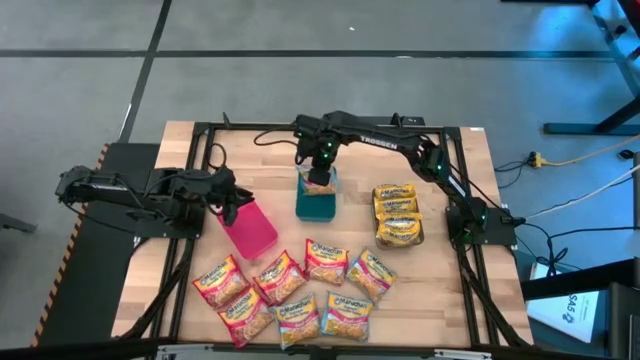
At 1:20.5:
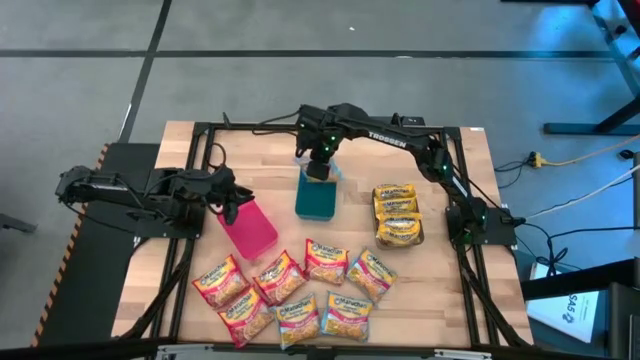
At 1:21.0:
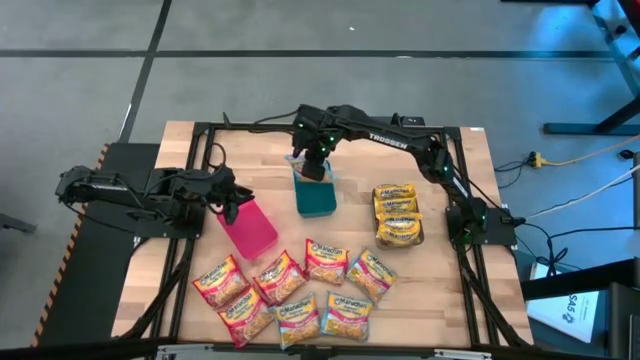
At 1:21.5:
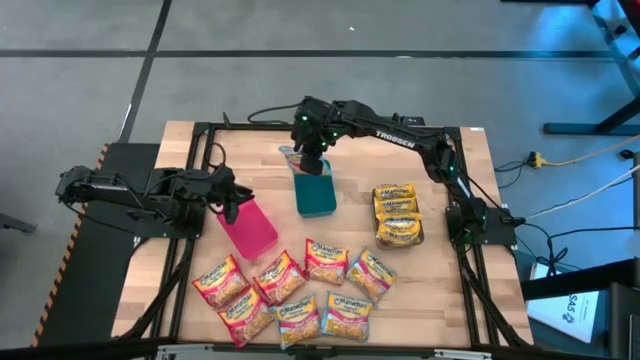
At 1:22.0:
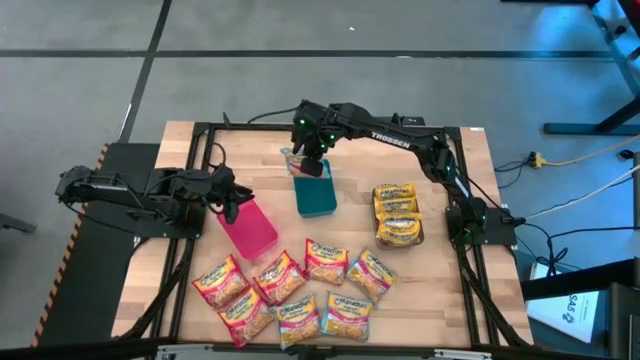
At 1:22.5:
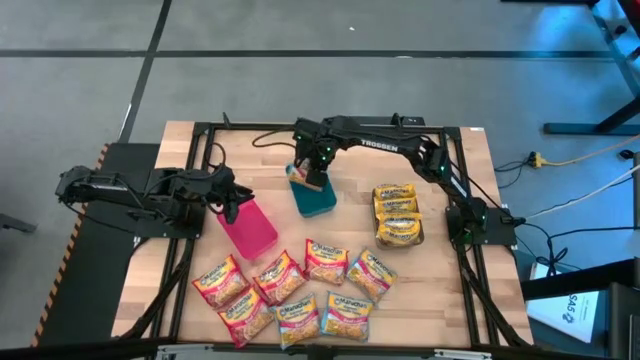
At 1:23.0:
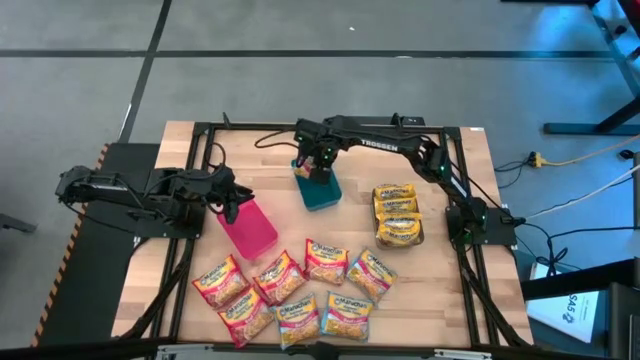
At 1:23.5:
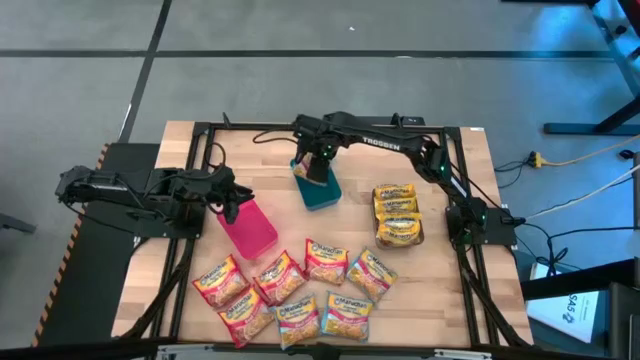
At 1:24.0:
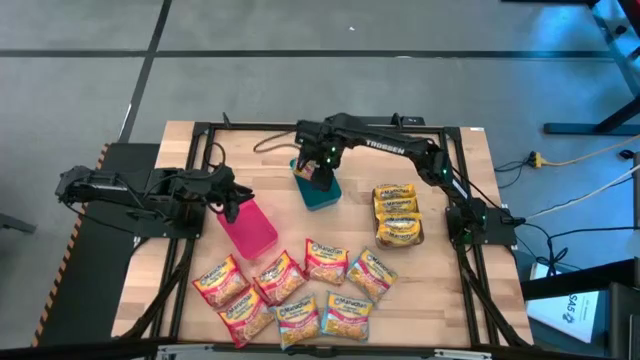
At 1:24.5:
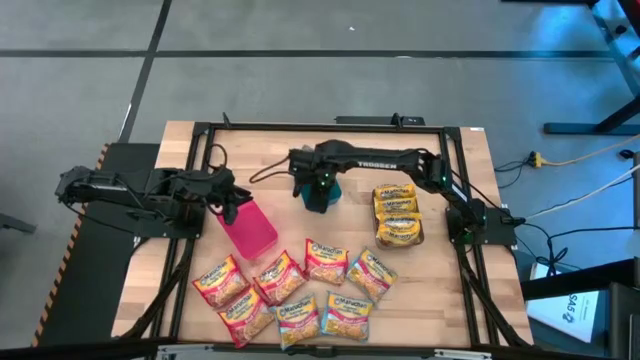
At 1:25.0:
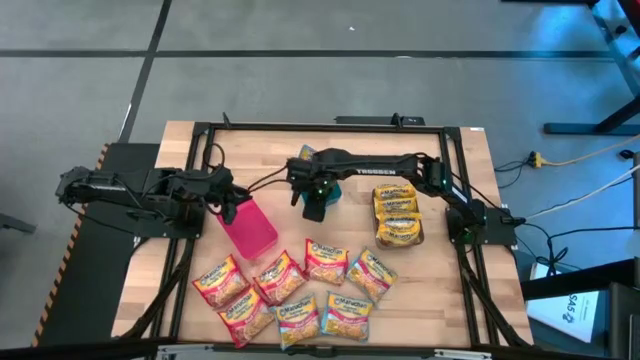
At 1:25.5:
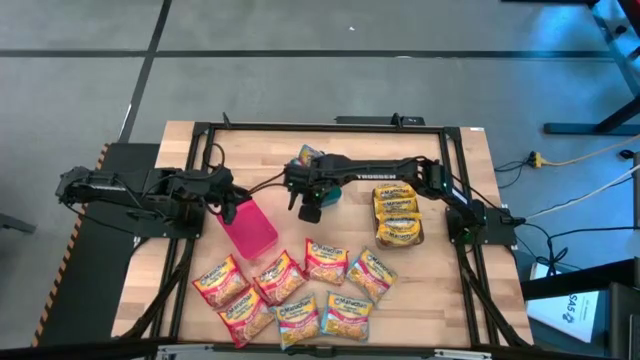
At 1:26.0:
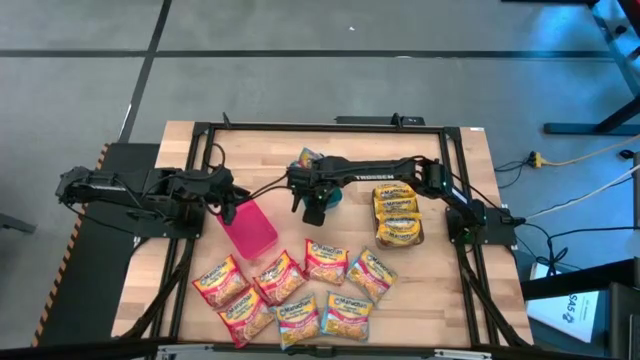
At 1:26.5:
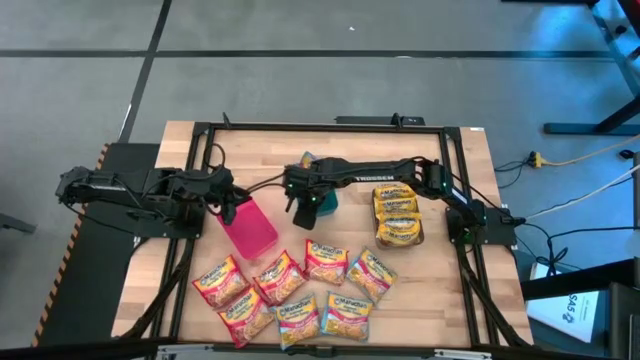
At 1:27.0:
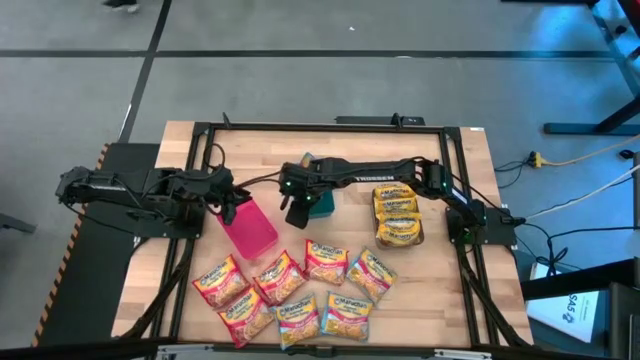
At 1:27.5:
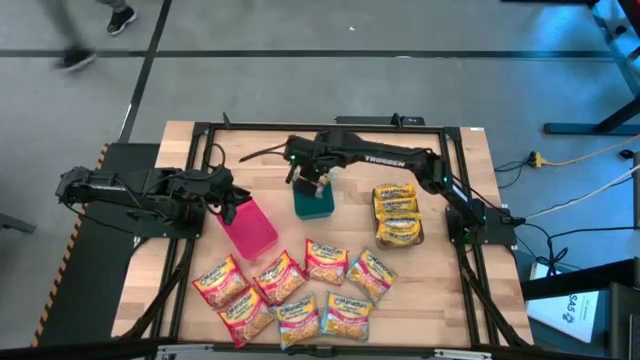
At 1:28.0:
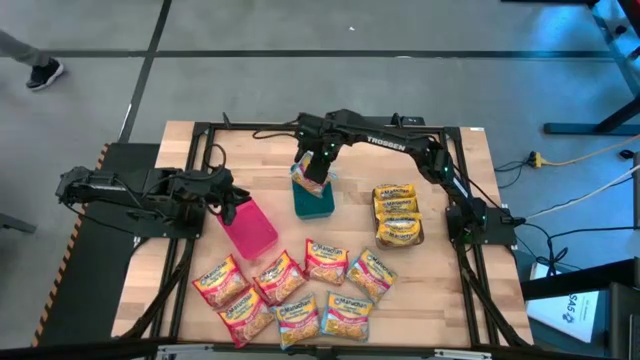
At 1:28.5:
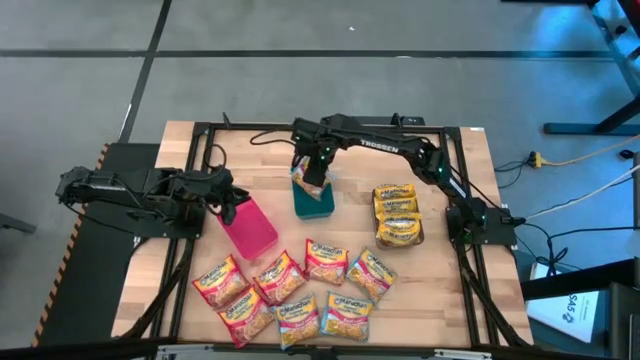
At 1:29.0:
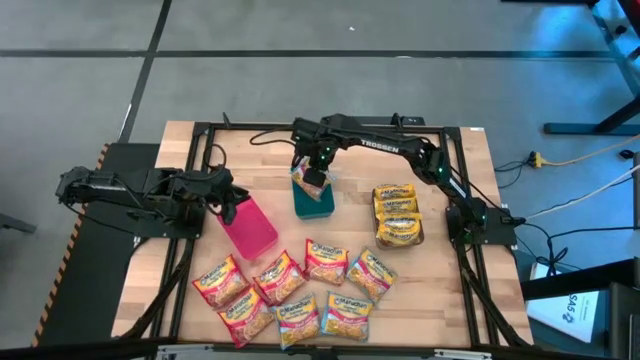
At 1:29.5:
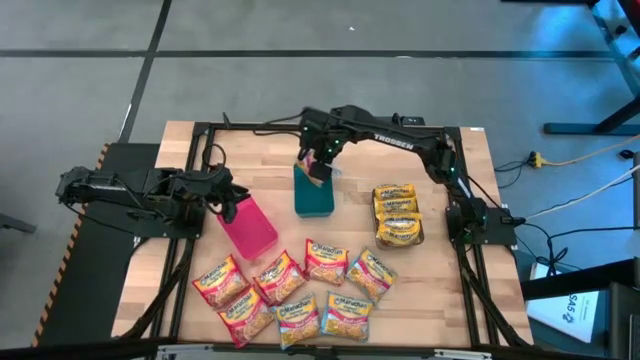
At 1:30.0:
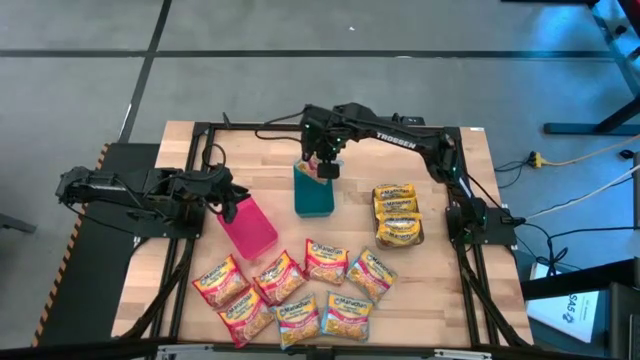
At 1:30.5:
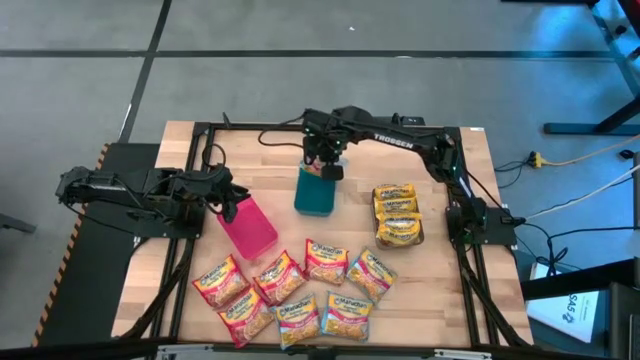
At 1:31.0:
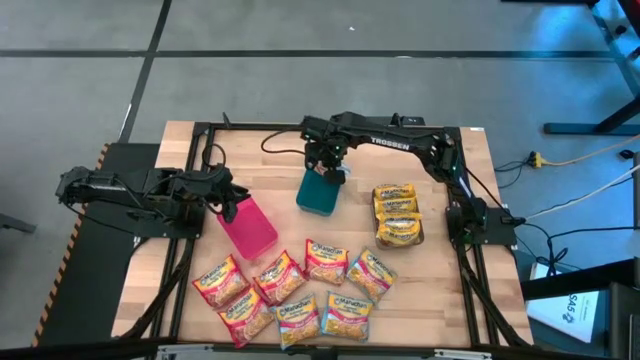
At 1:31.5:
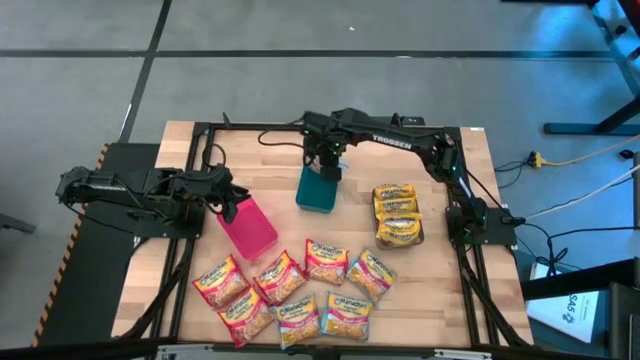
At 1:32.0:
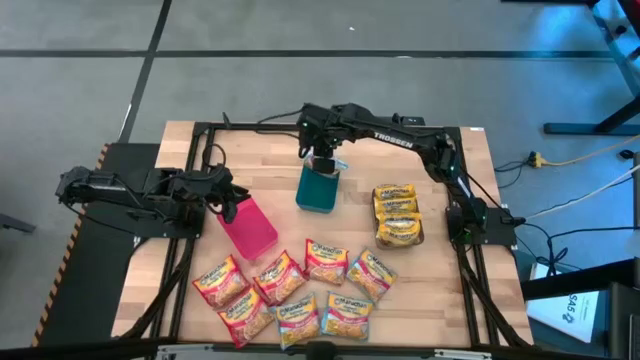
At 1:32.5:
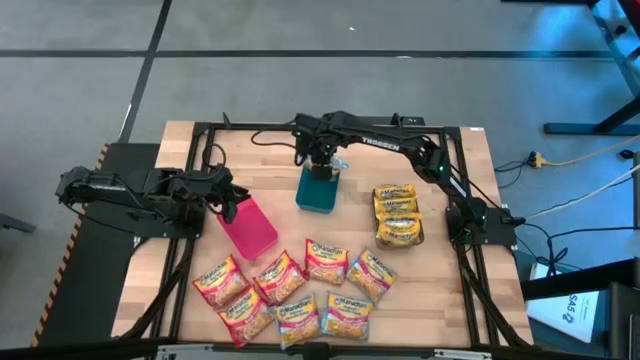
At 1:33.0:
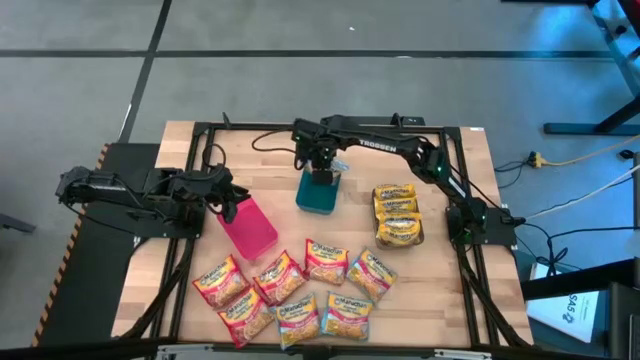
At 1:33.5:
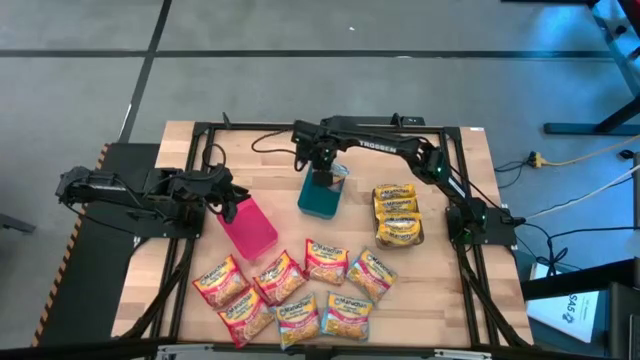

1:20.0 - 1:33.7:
Task: Sort Maruchan noodles
Put the blue noodle pack into the blue bin

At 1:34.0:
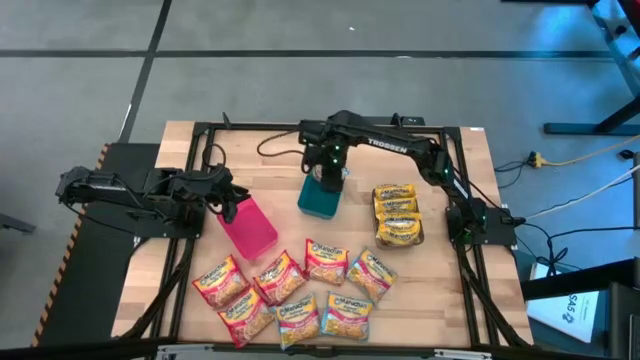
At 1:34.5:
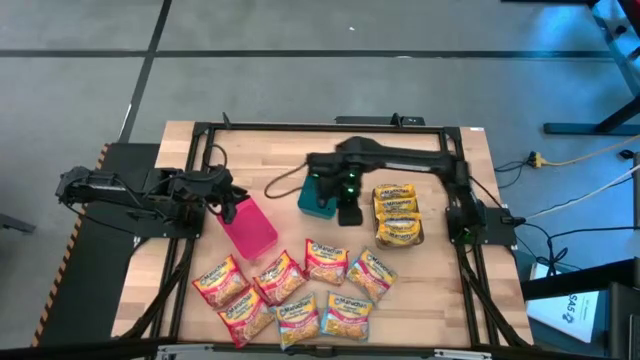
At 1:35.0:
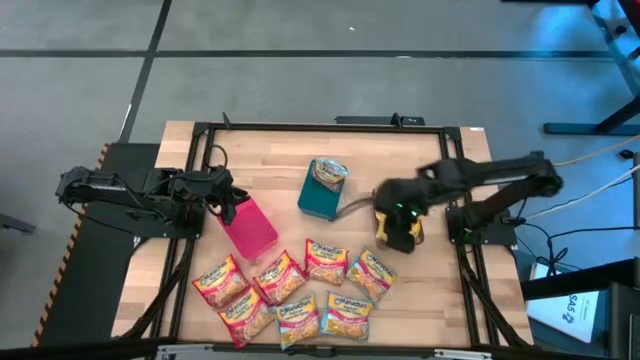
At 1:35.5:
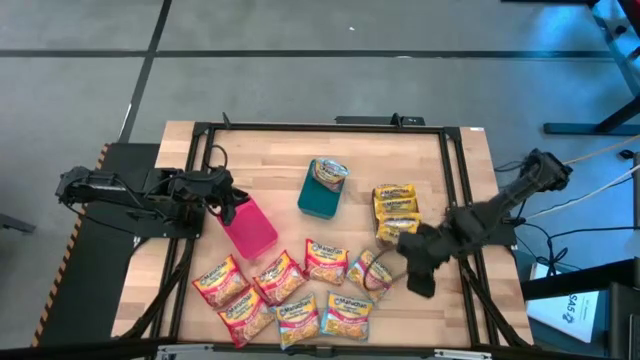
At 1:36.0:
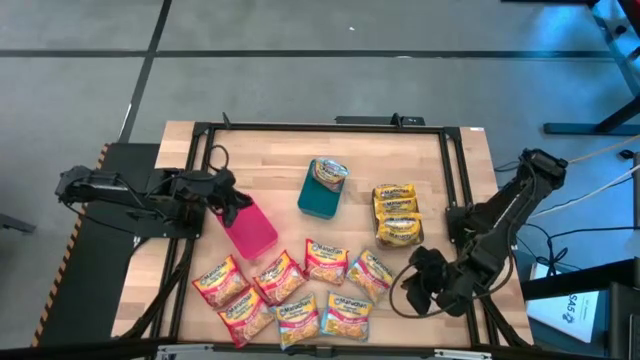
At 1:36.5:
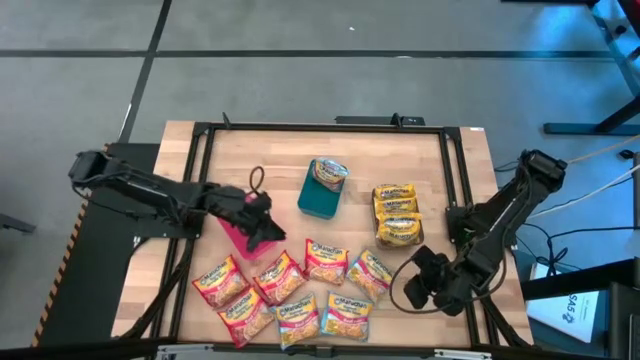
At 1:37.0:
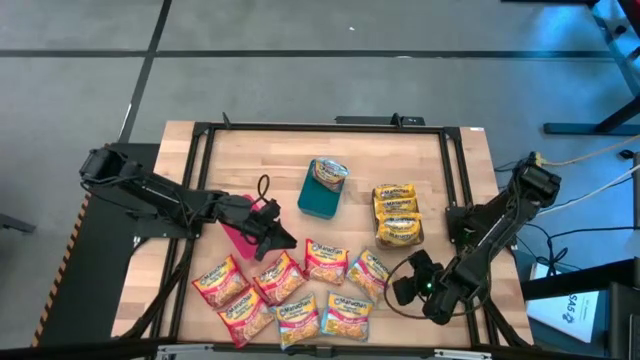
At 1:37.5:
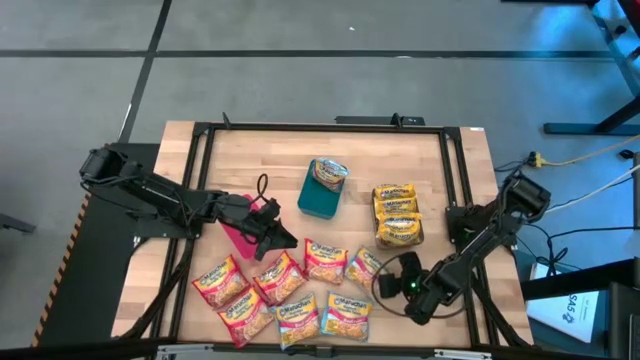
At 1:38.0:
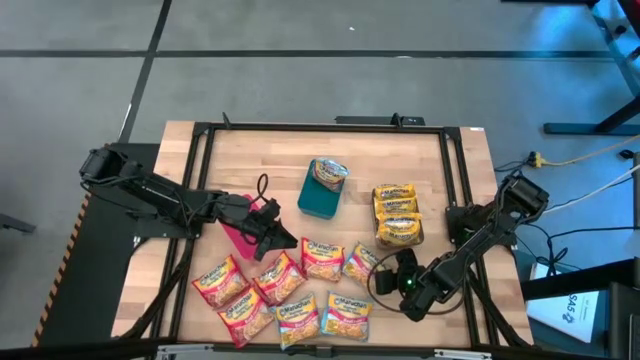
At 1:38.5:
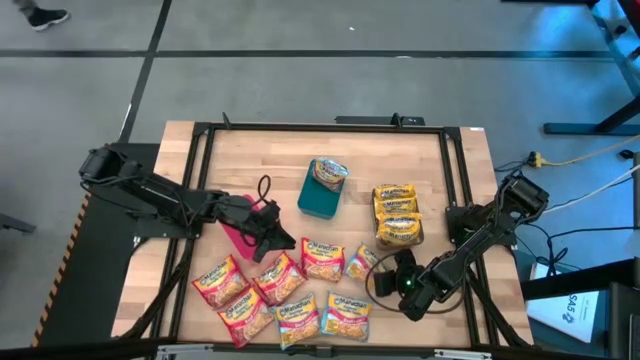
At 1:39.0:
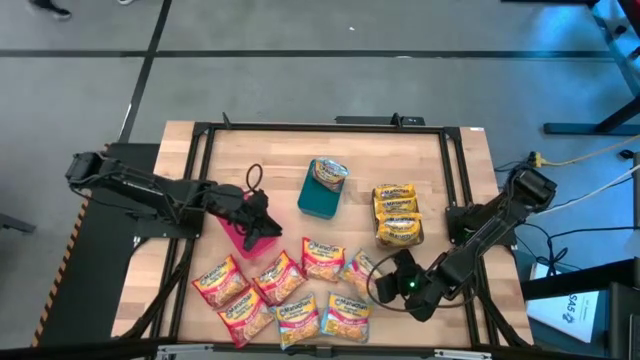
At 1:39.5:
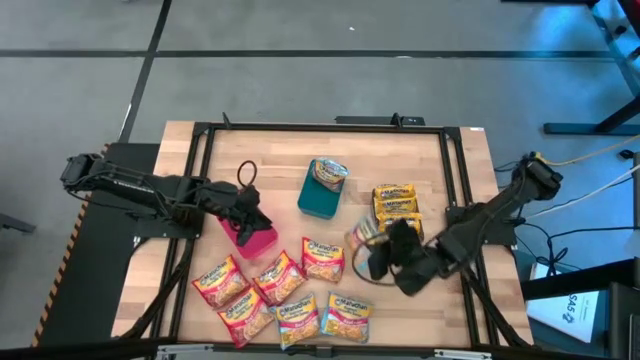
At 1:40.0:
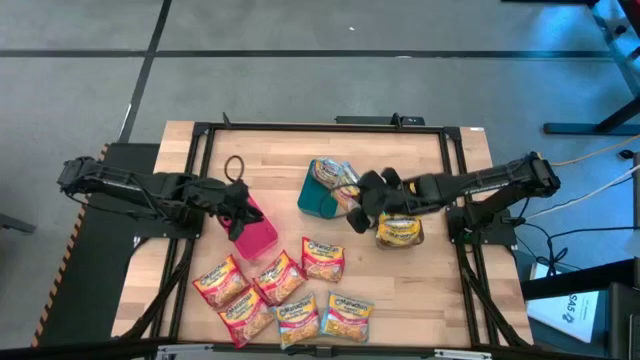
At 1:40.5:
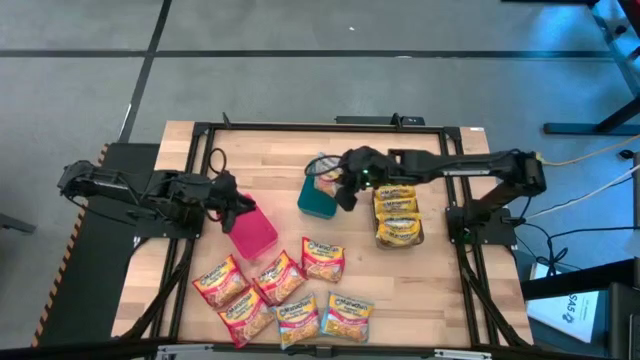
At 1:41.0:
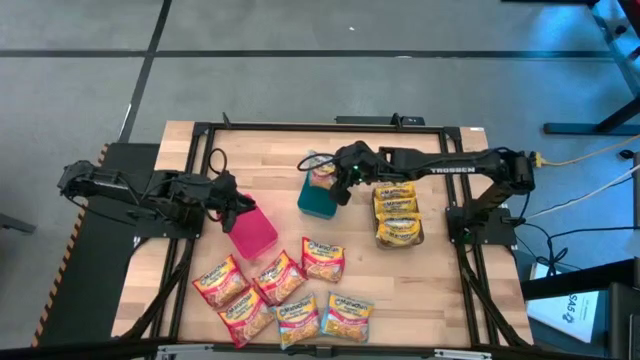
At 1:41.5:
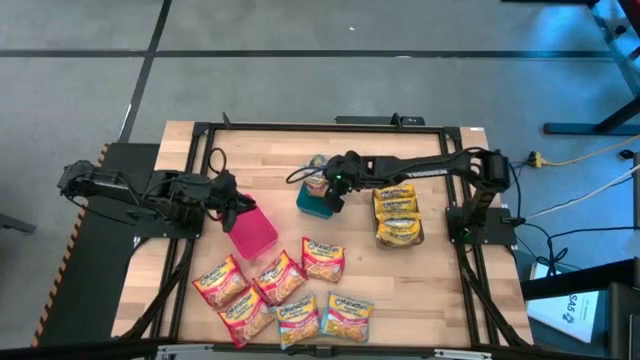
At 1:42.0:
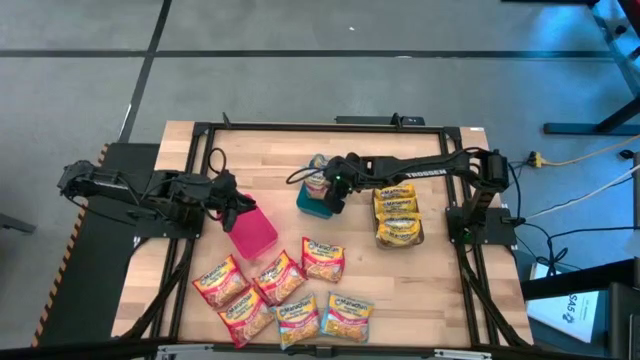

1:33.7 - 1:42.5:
Put the blue noodle pack into the blue bin
